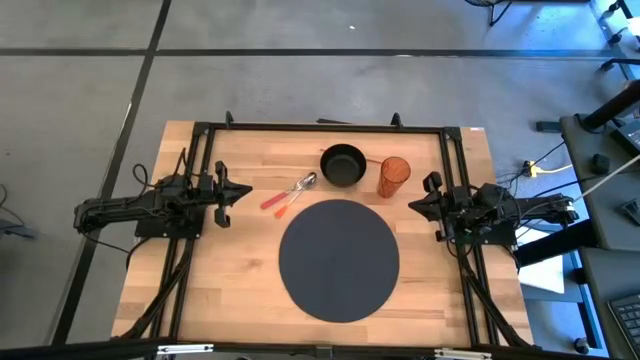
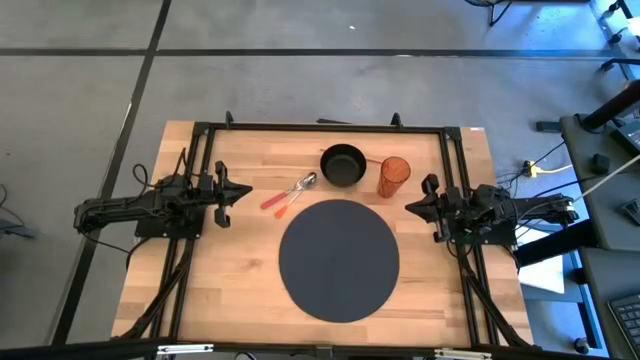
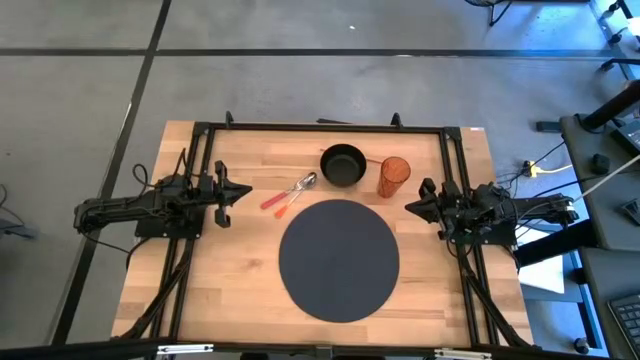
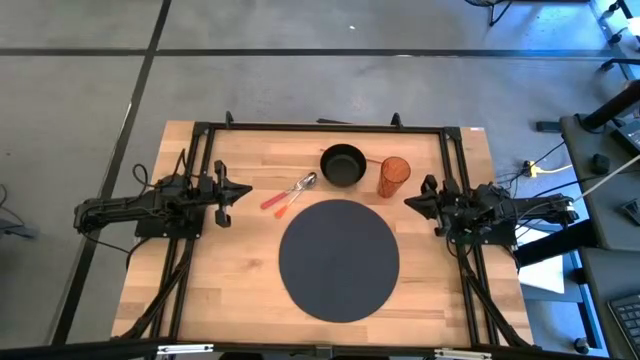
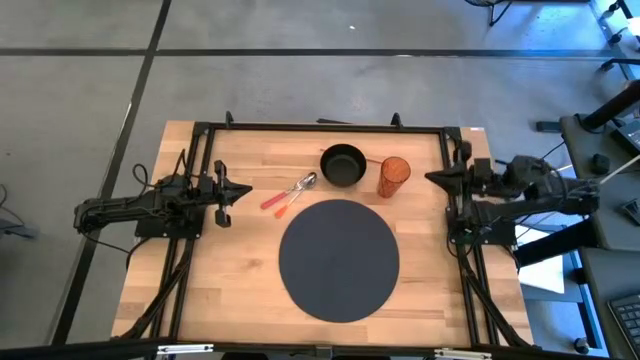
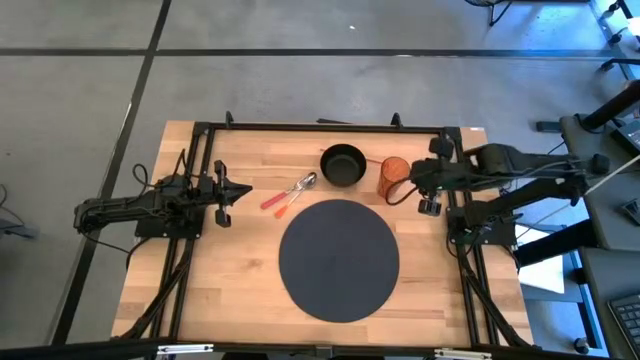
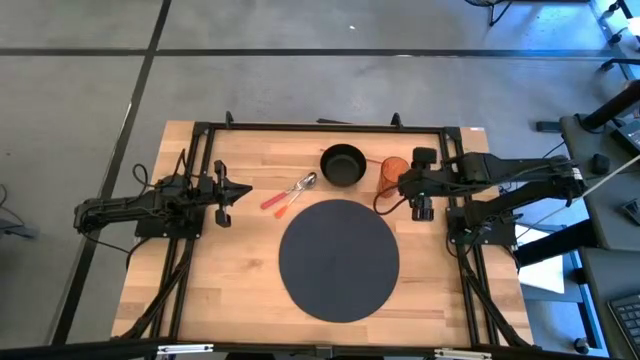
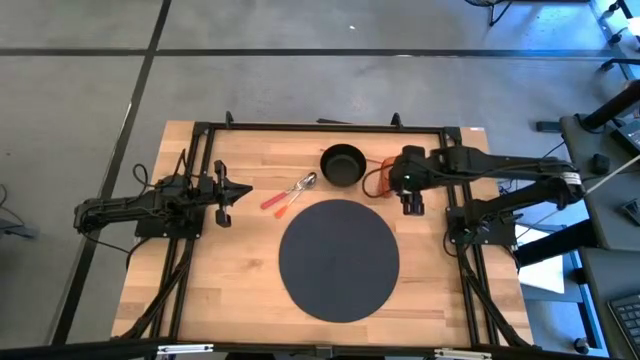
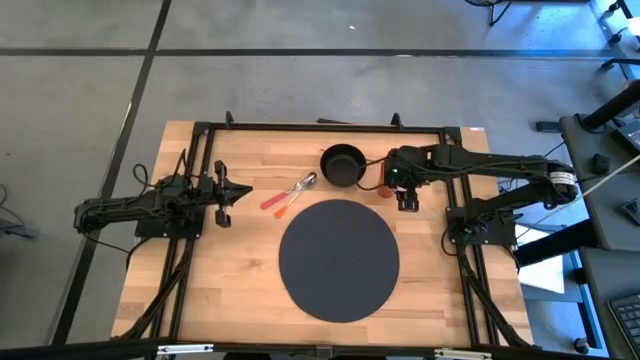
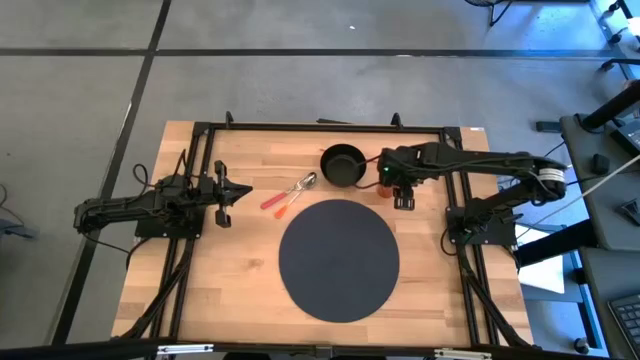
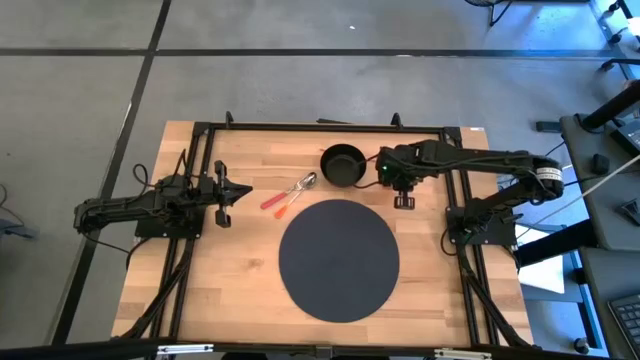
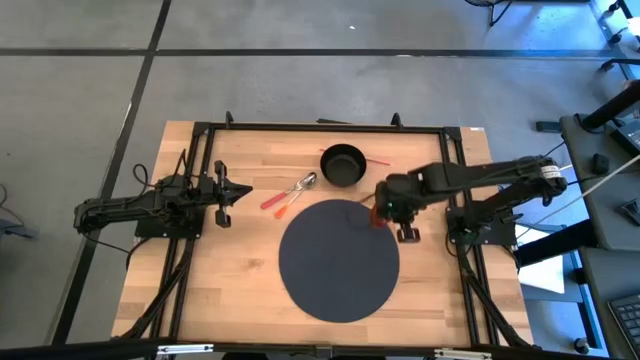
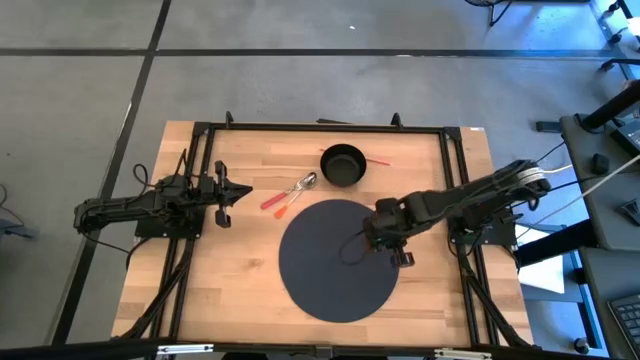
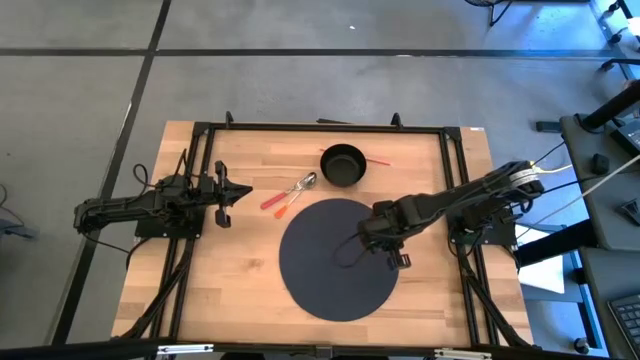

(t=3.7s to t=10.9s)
Task: Pick & Place Utensil
Put the cup on the mat

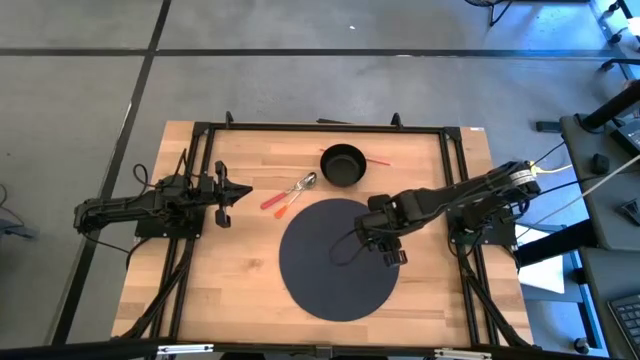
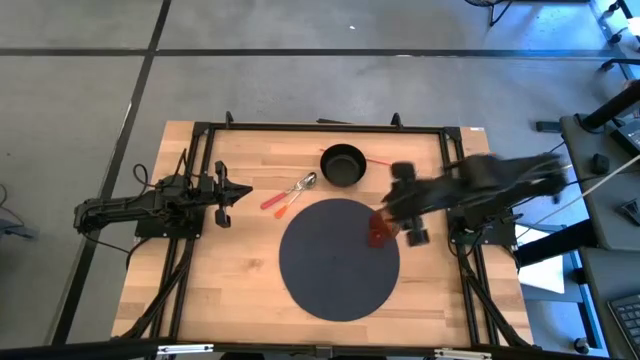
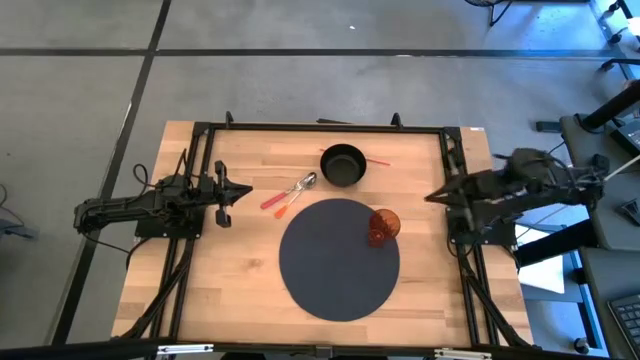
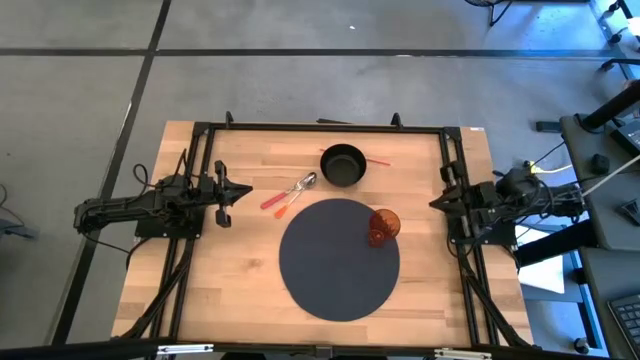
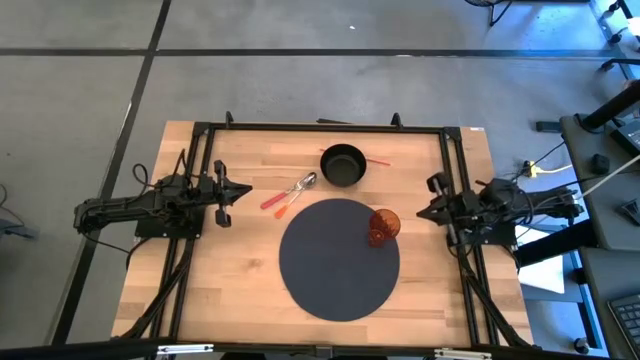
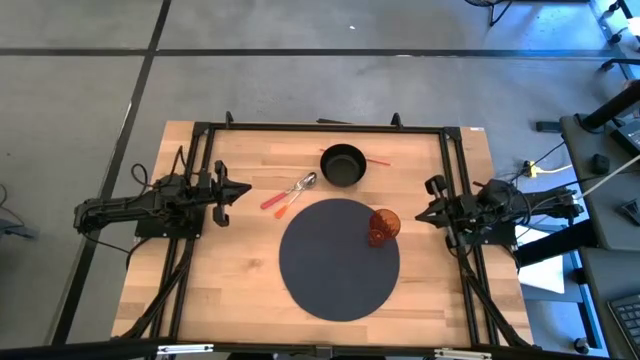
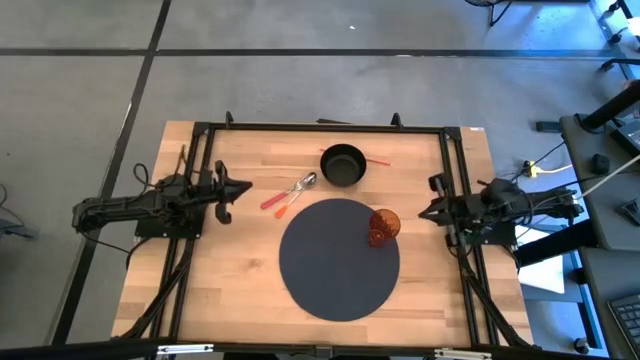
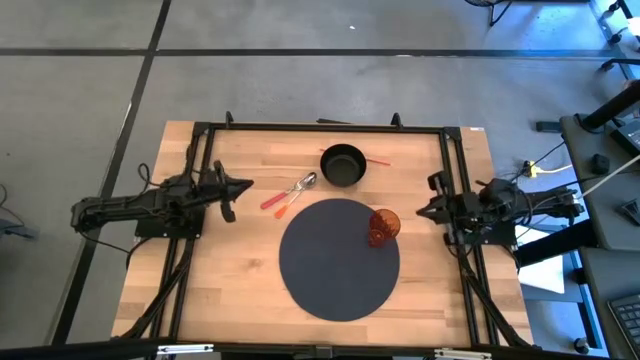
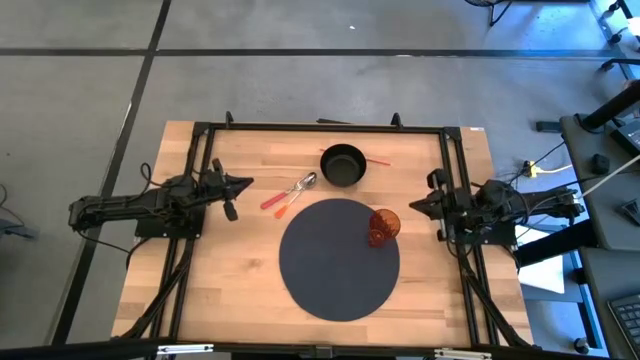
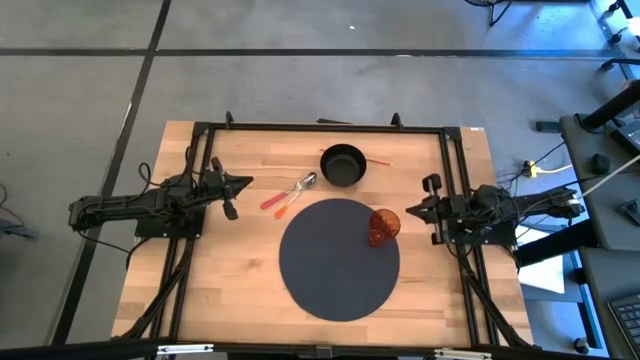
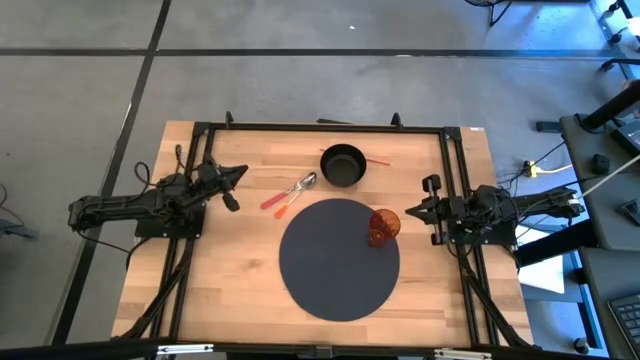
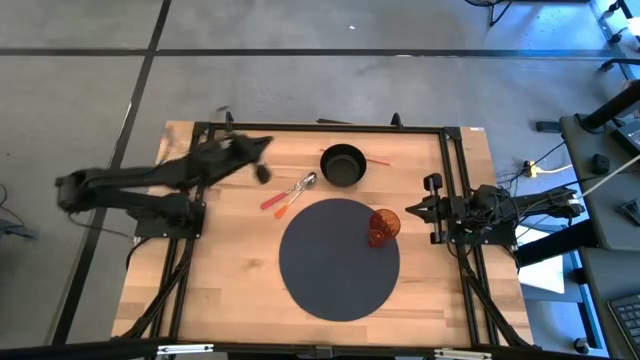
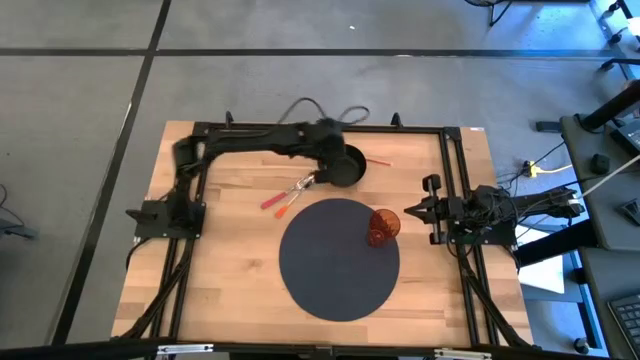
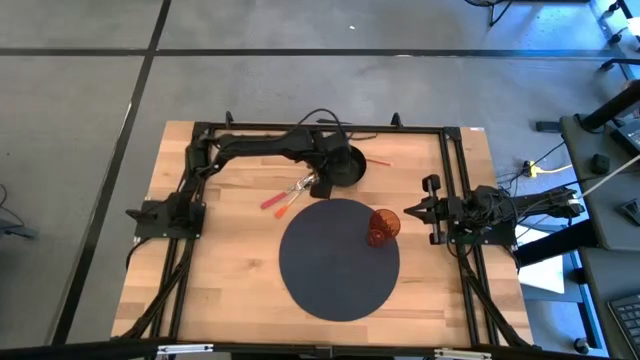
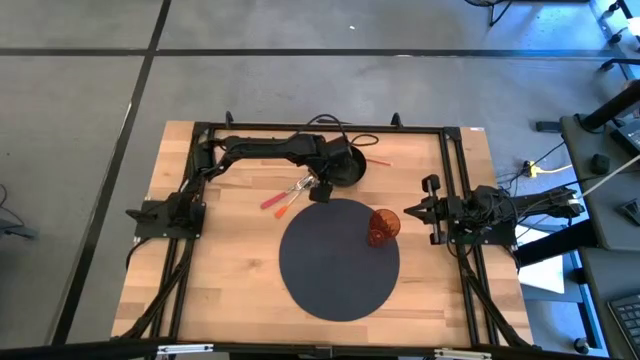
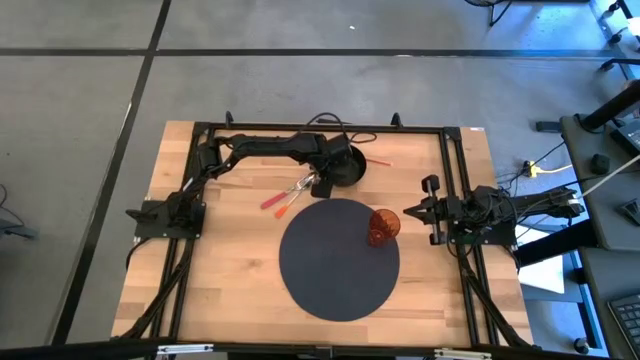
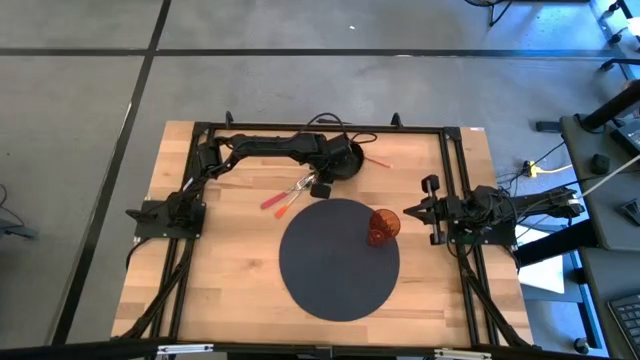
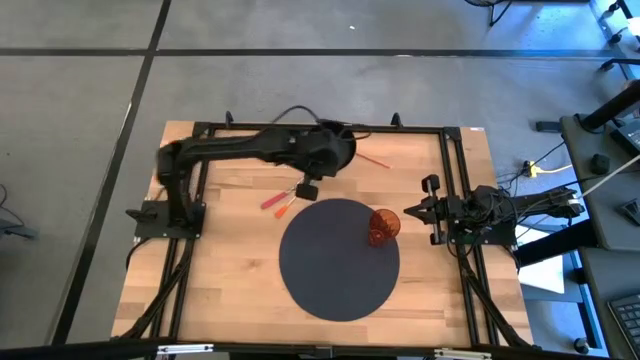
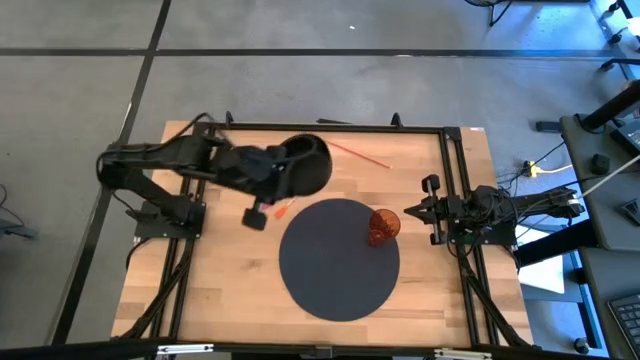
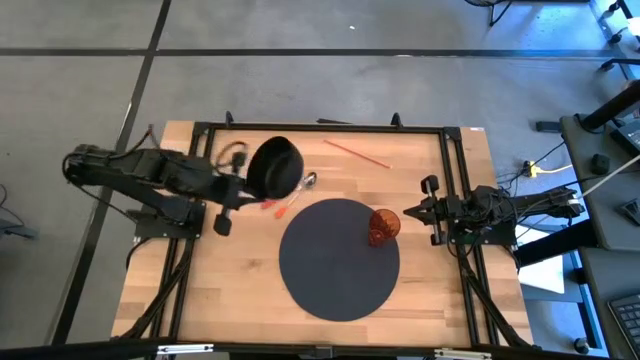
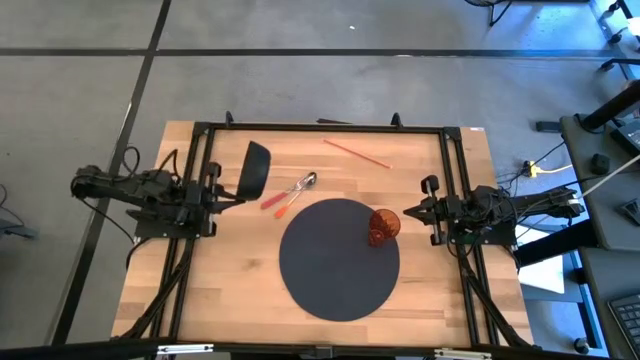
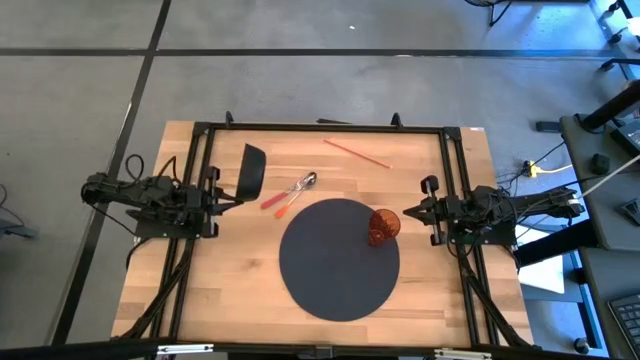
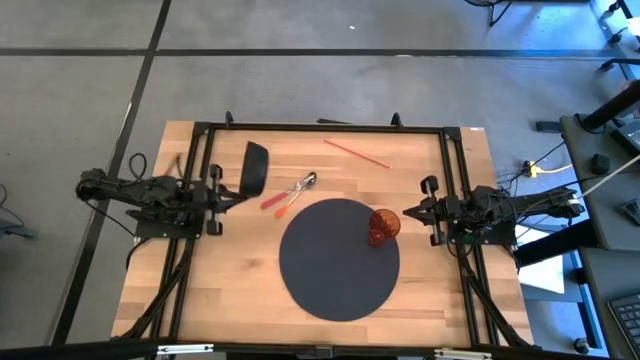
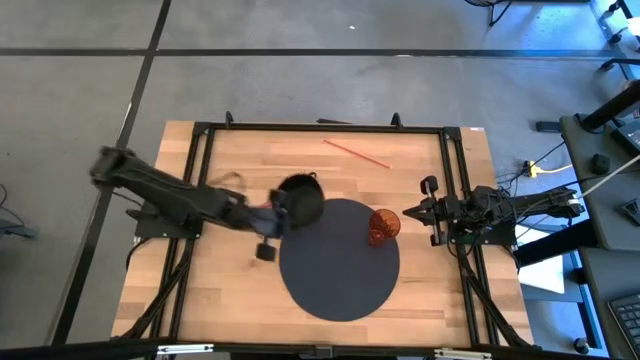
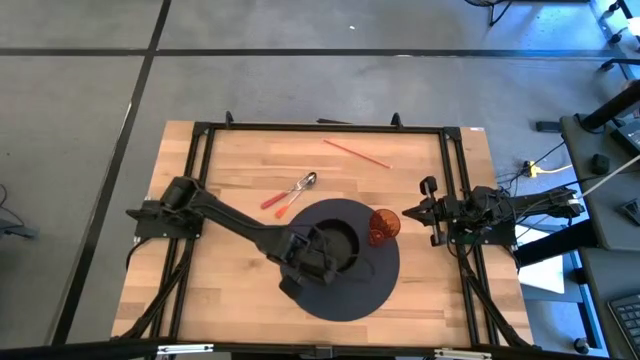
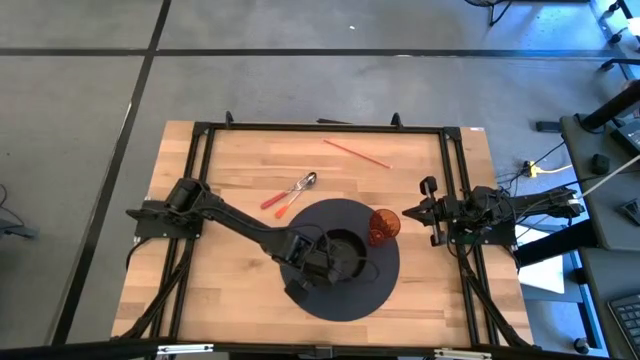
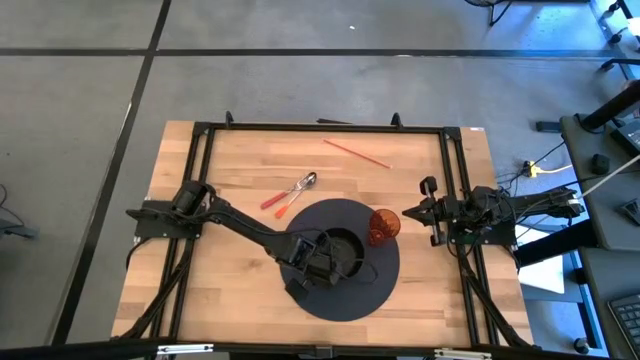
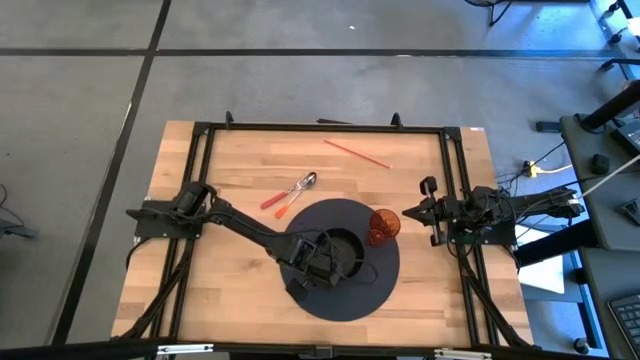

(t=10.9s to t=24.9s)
Put the bowl in the center of the mat
